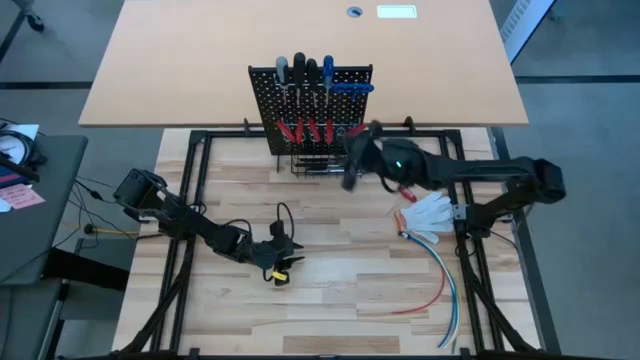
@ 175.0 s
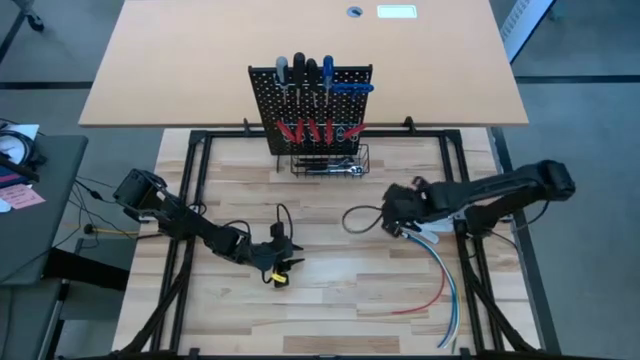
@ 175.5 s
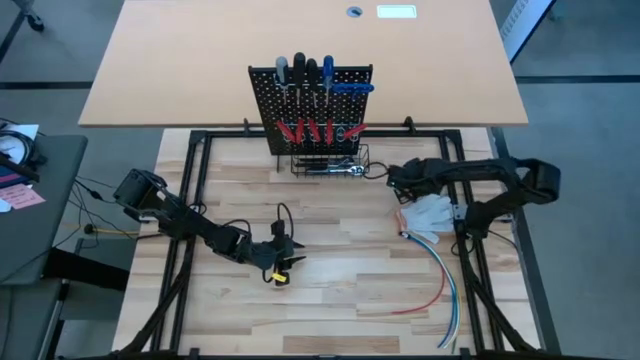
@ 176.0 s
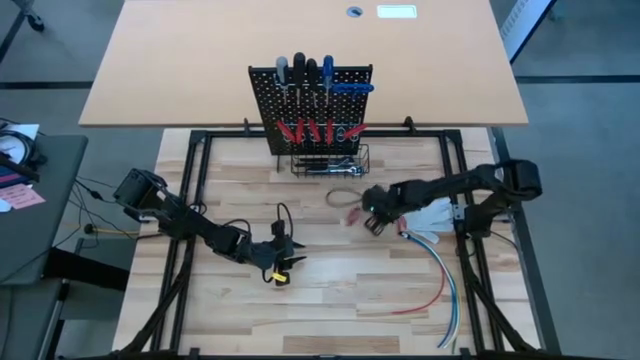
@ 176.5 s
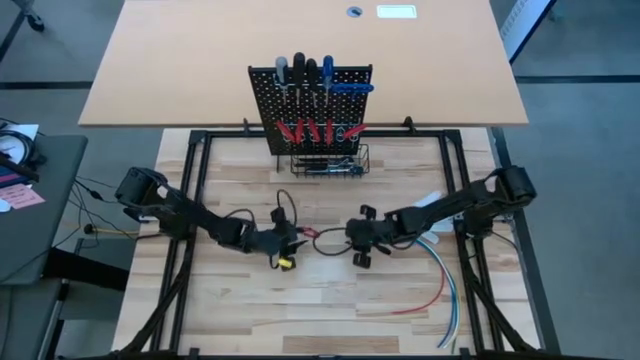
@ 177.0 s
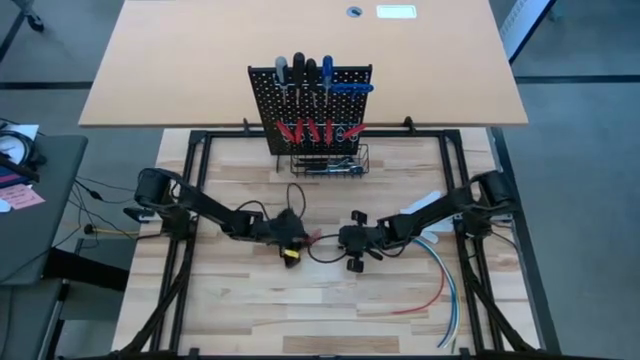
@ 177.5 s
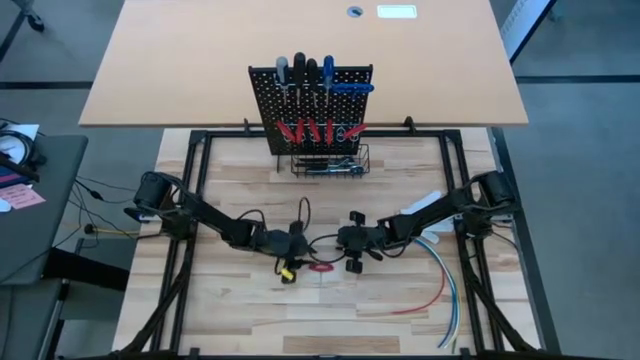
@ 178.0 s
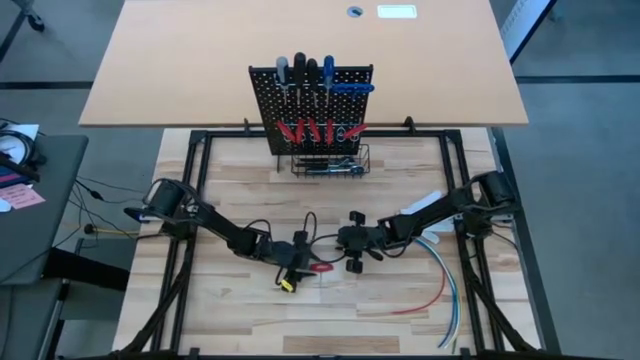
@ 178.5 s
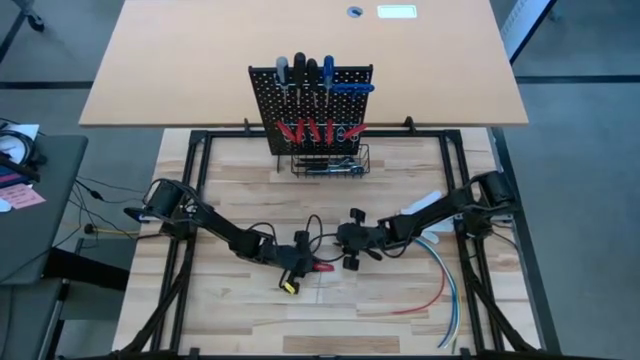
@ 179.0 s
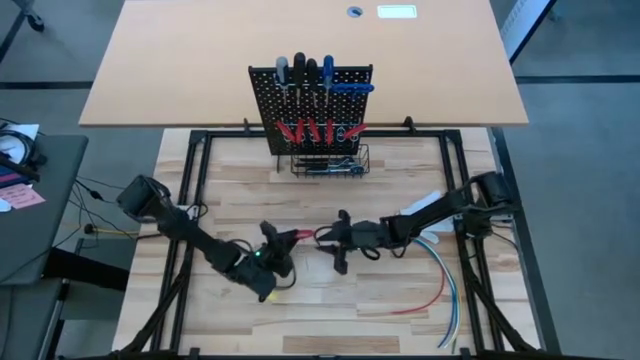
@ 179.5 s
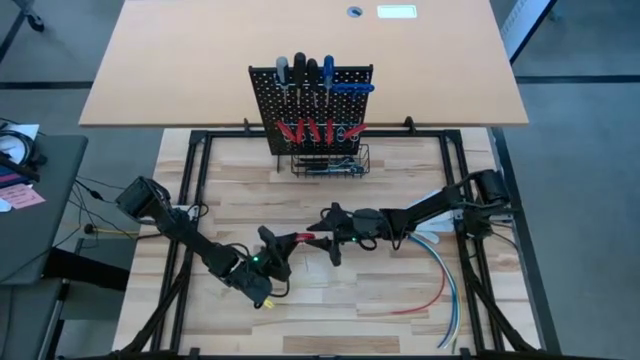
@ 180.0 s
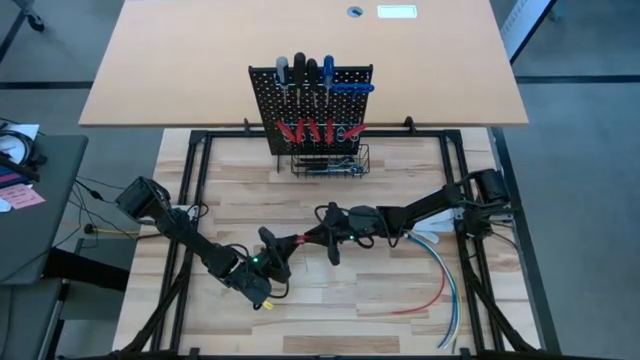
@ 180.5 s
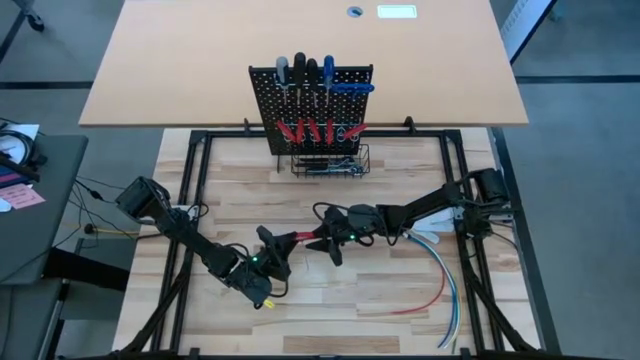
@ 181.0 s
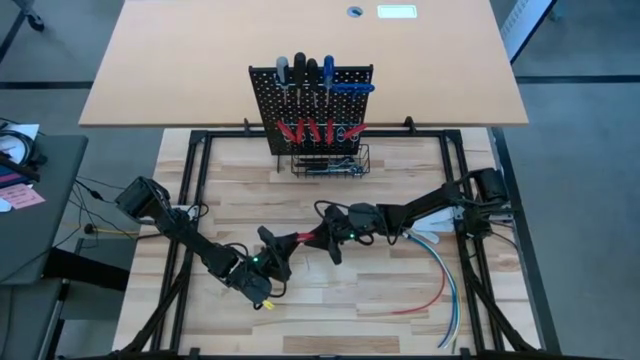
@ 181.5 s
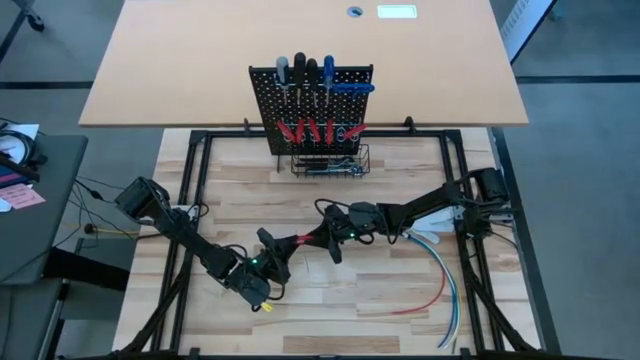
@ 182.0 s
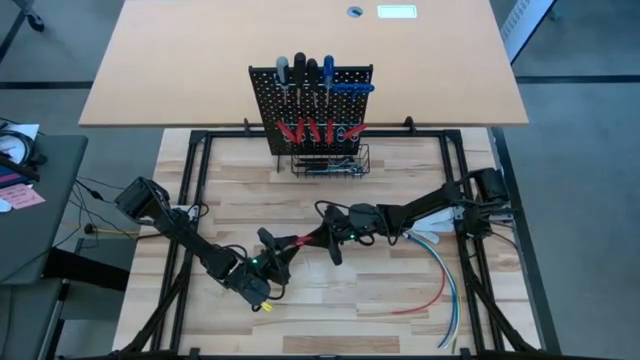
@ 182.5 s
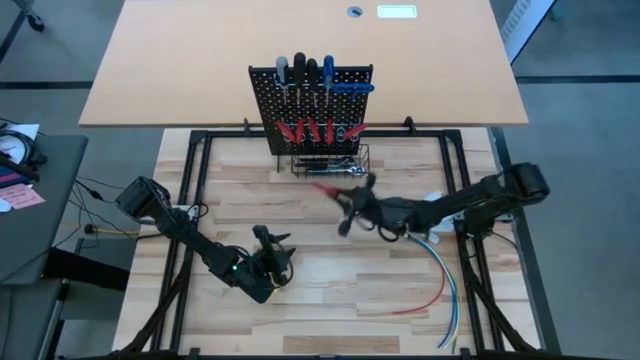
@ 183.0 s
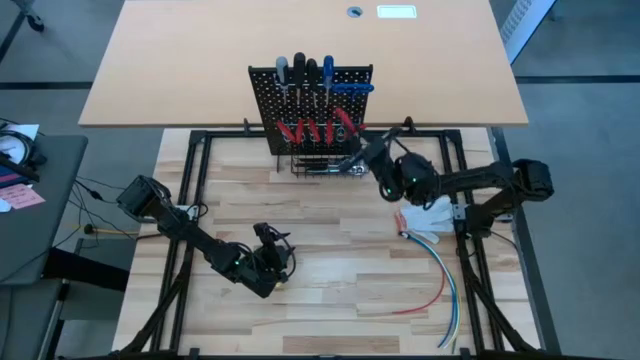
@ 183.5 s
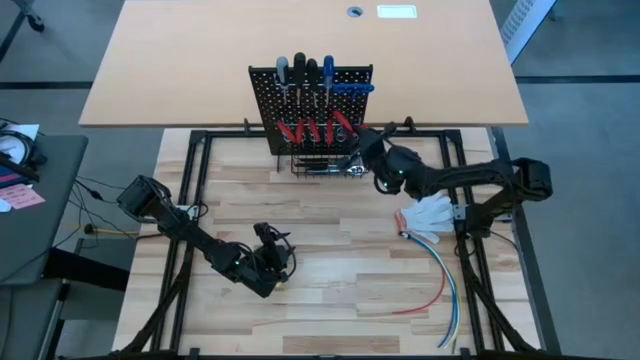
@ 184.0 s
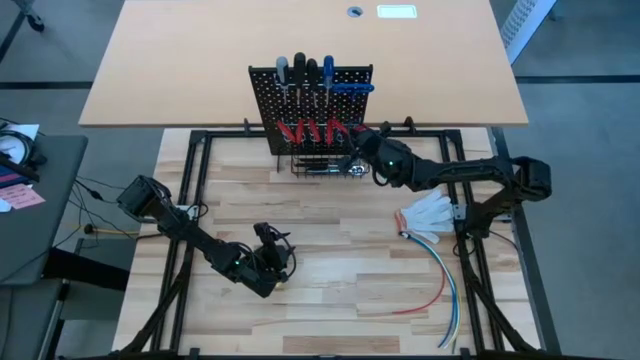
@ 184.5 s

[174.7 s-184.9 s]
Task: Hang tools onto peg board
Hang the red allen wrench on the pegboard

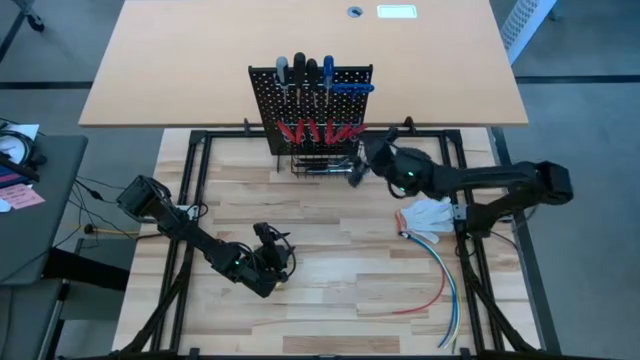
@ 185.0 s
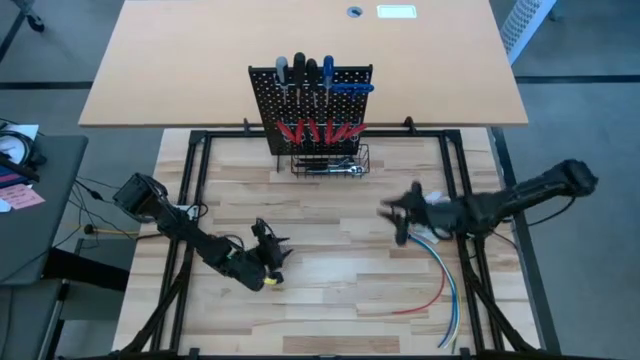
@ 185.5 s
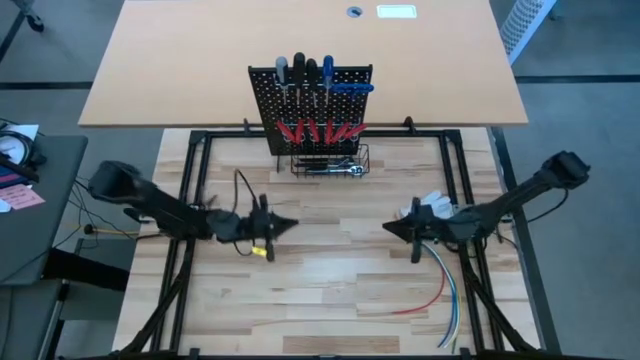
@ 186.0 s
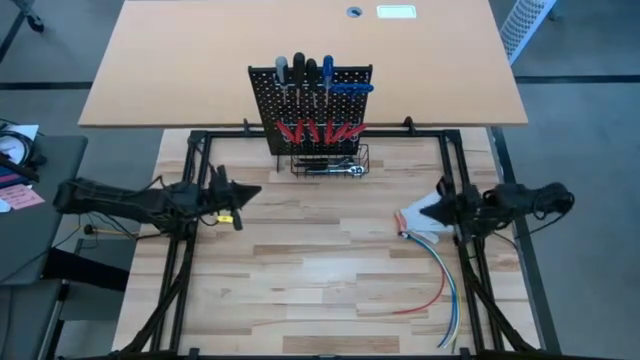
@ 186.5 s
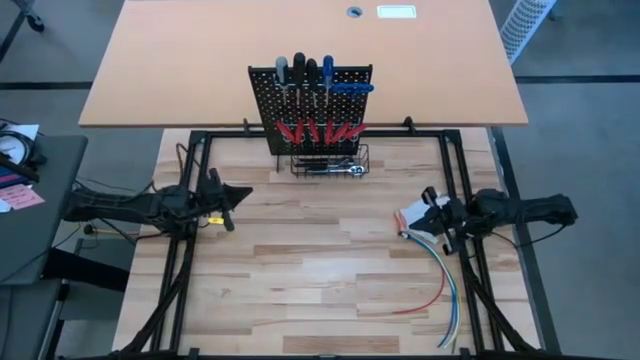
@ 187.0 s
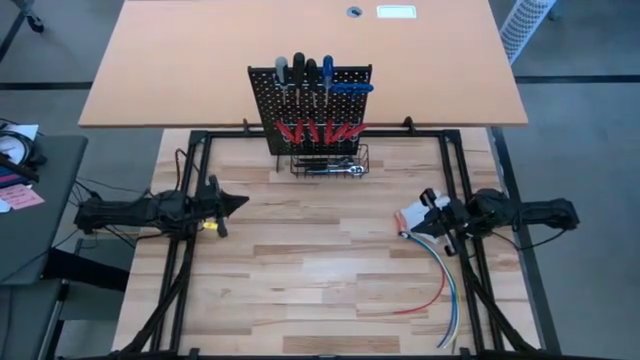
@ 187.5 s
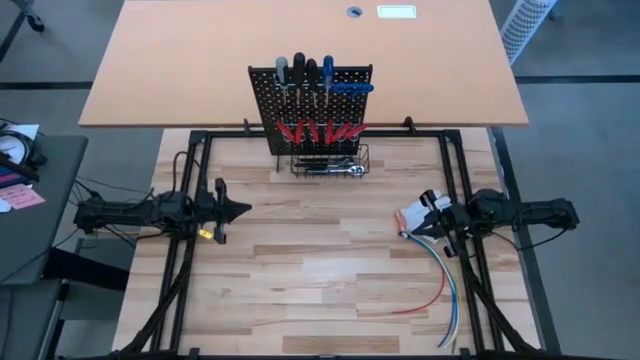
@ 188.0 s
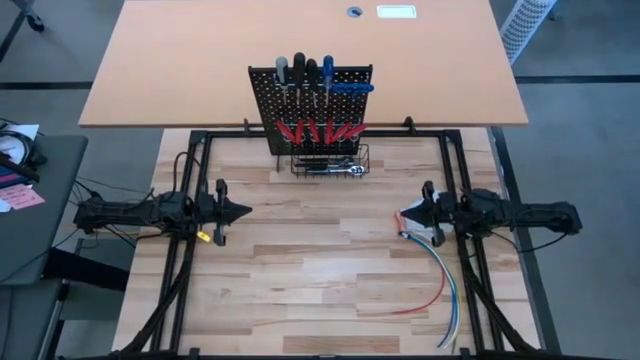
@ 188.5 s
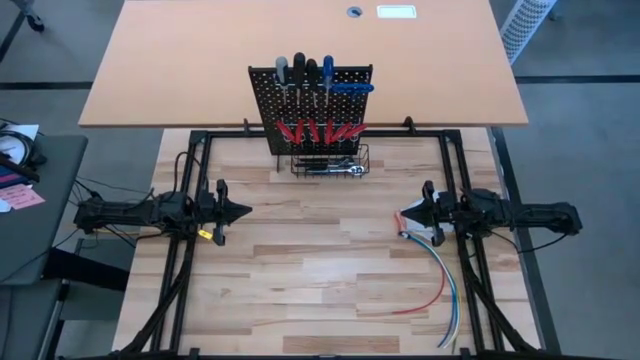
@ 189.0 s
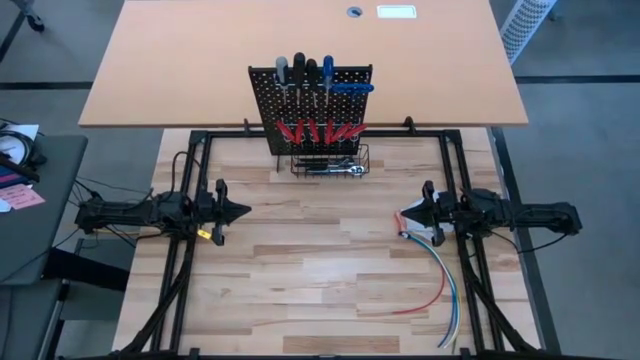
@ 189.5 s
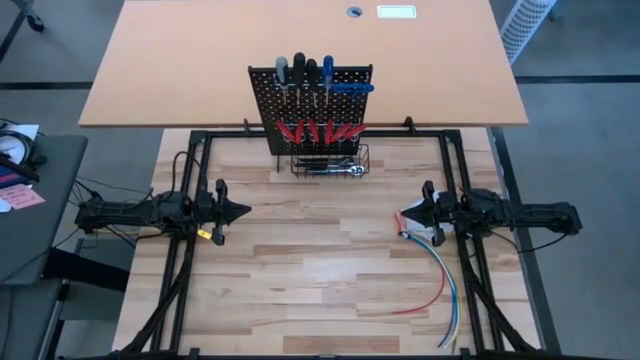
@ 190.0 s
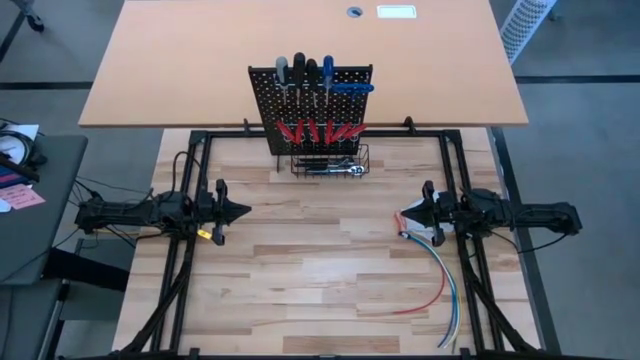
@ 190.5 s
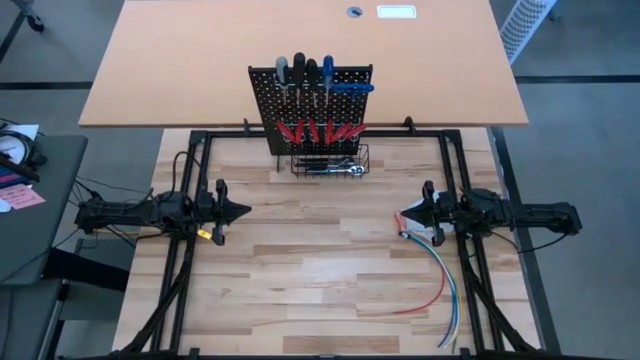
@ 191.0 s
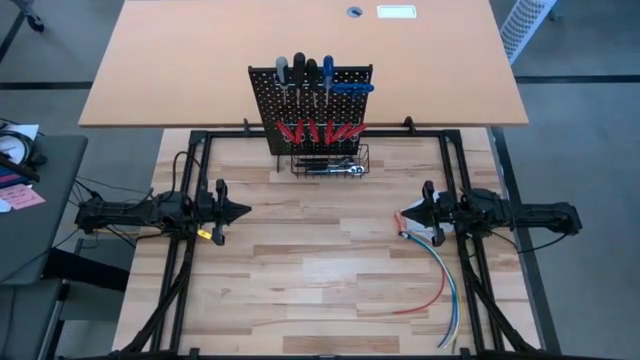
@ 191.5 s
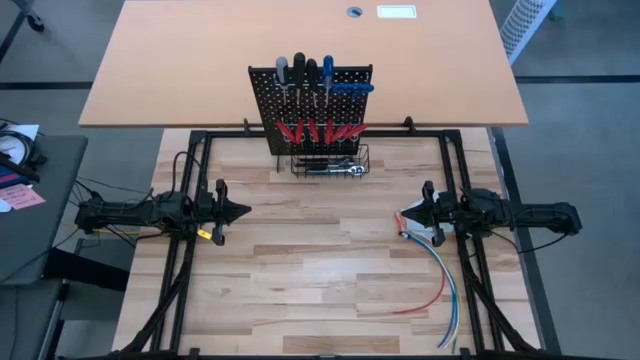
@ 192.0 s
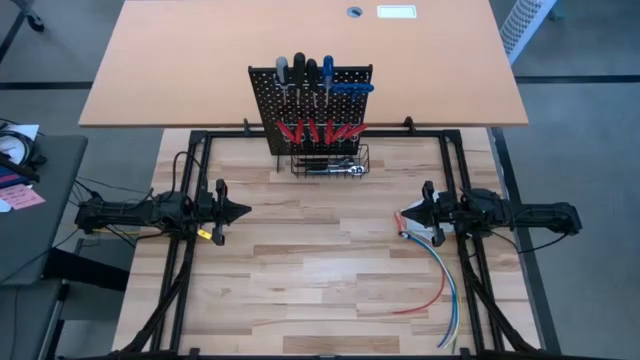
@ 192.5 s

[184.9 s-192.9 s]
Return to Home Position

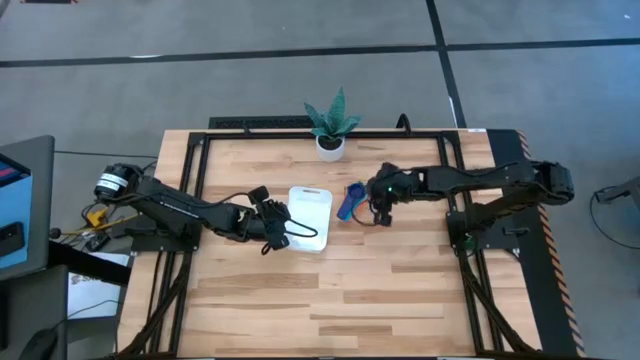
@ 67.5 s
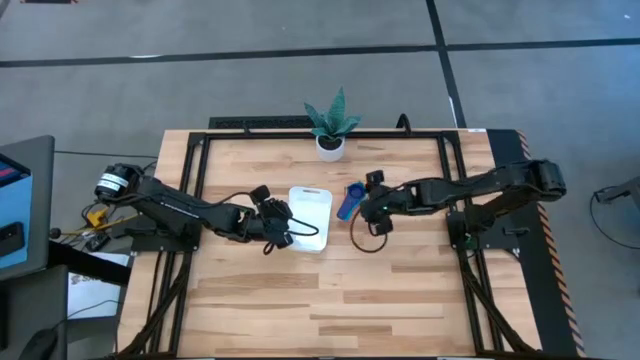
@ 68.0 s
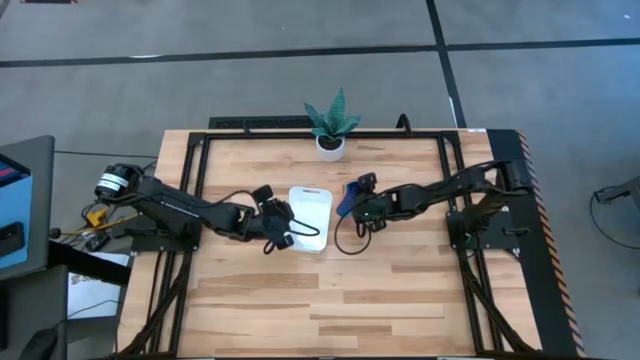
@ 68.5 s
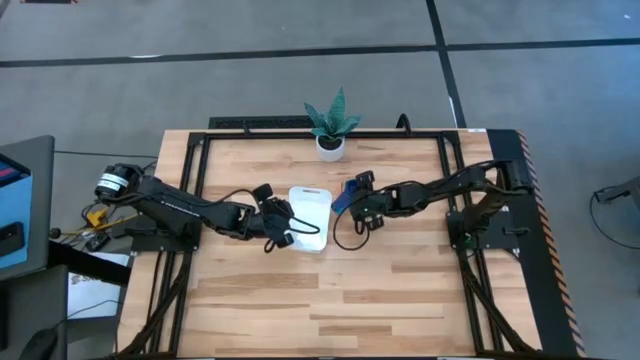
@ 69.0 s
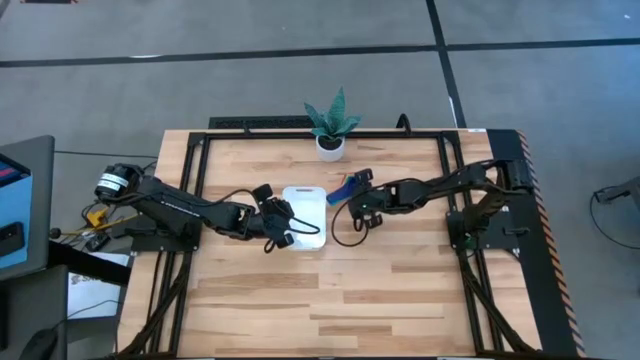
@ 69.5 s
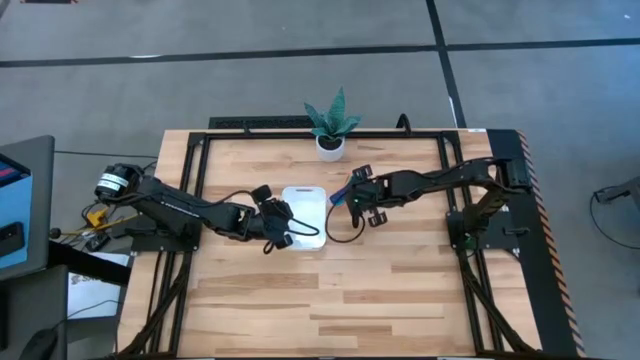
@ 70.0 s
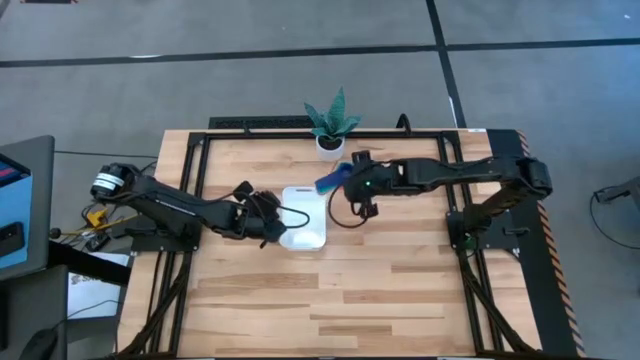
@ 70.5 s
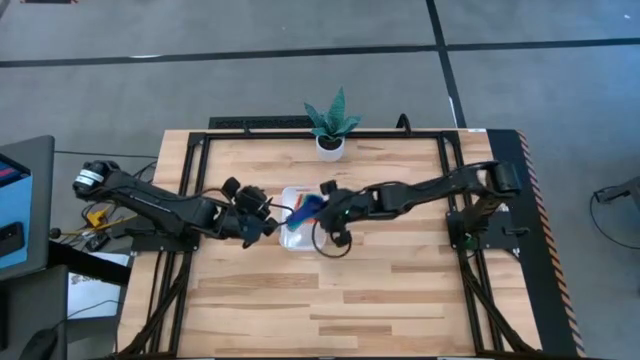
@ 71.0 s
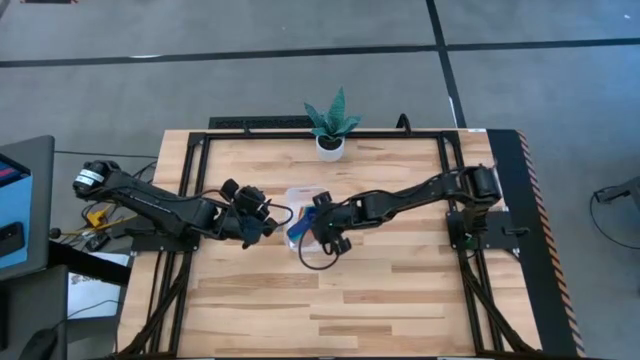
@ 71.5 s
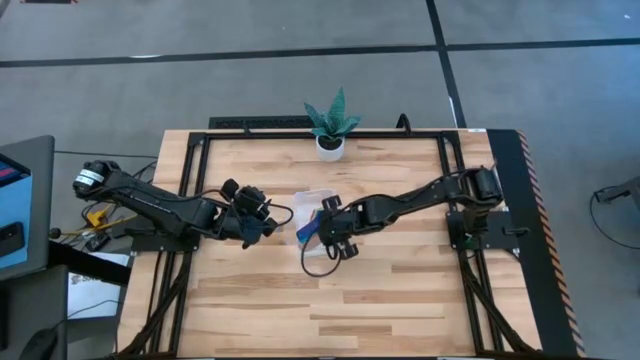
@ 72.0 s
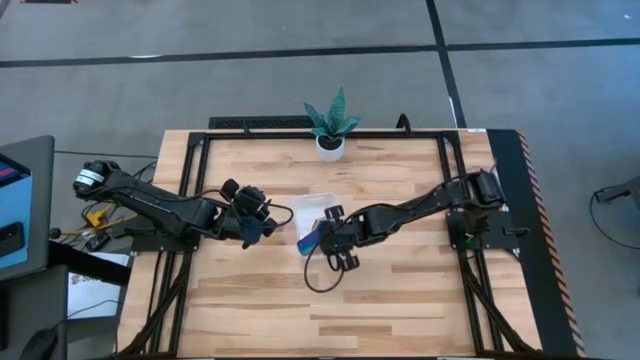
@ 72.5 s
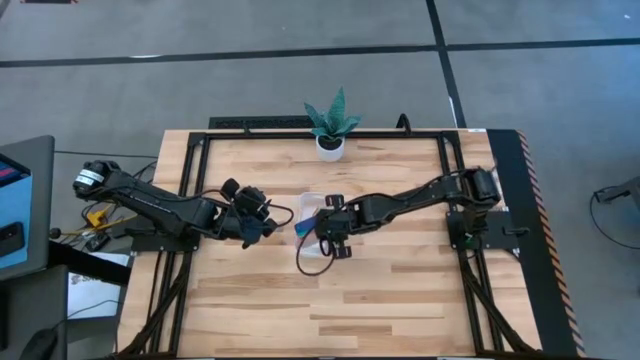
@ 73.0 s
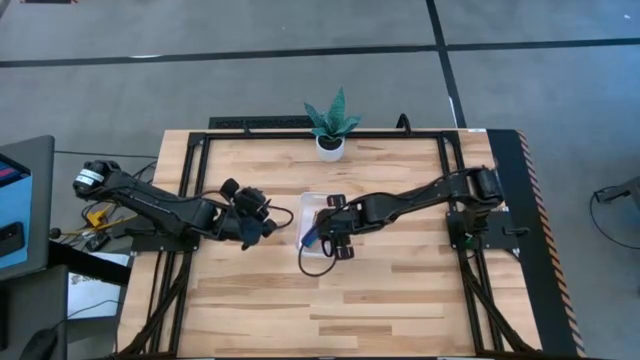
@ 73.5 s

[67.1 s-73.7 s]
Task: Nest measuring cups in basket
Put the stacked measuring cups into the white bin
